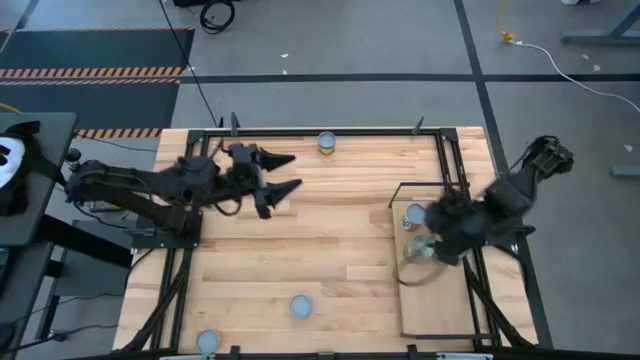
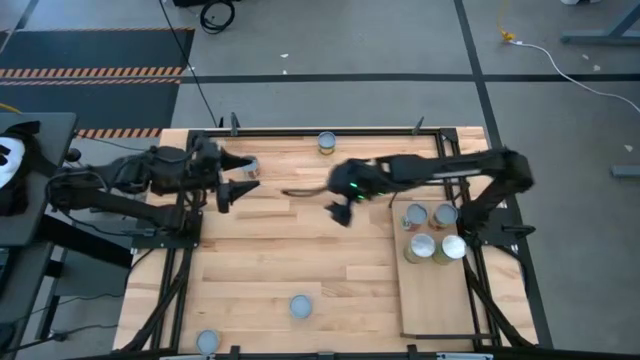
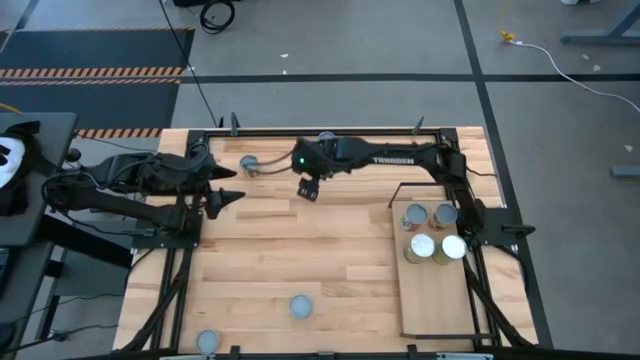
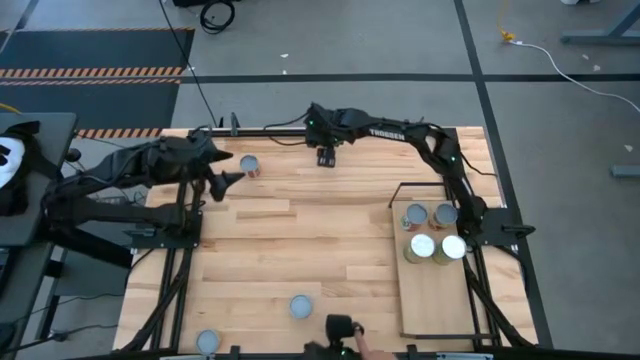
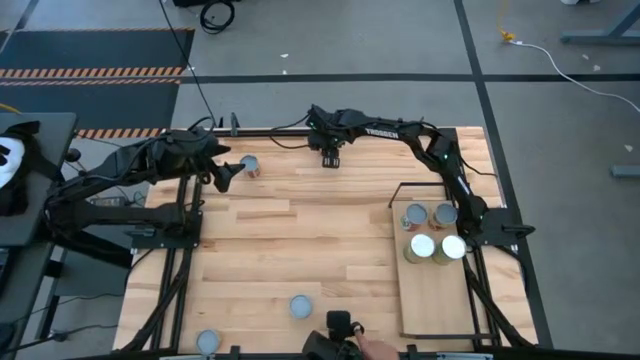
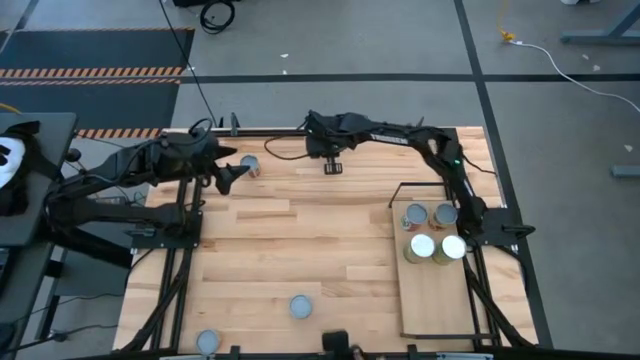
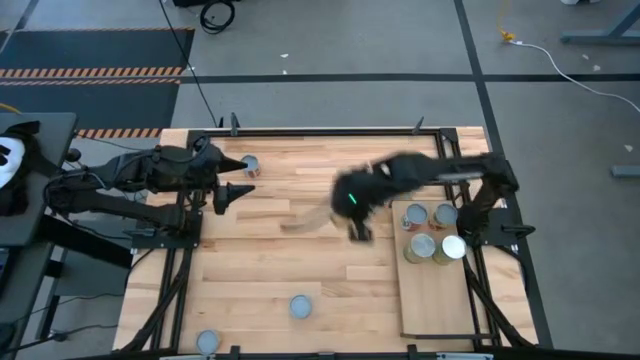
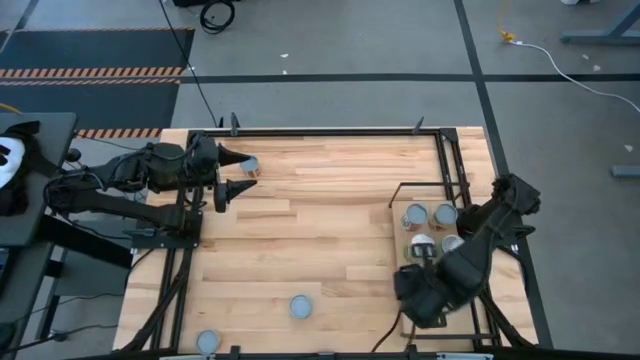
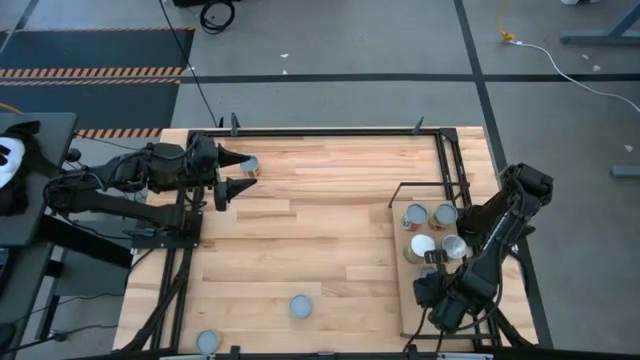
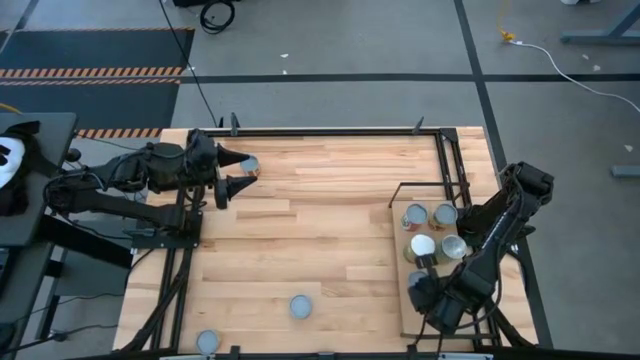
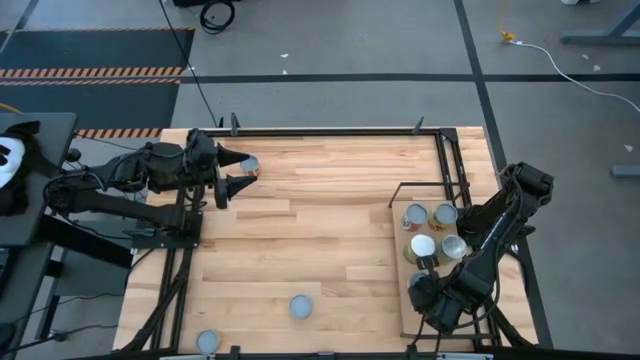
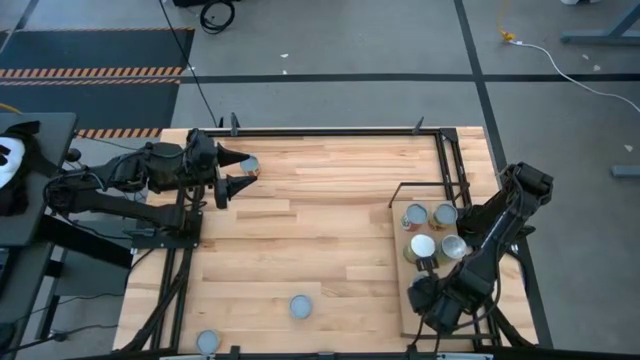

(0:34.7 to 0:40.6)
Task: Pick and place cans onto a shelf
Put the canned peach on the shelf

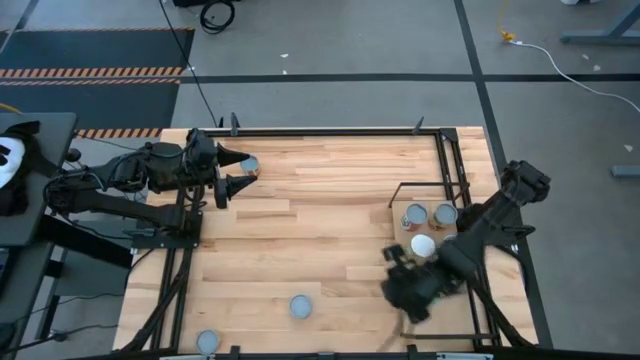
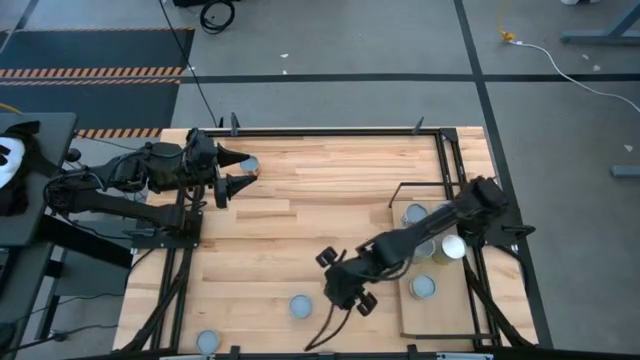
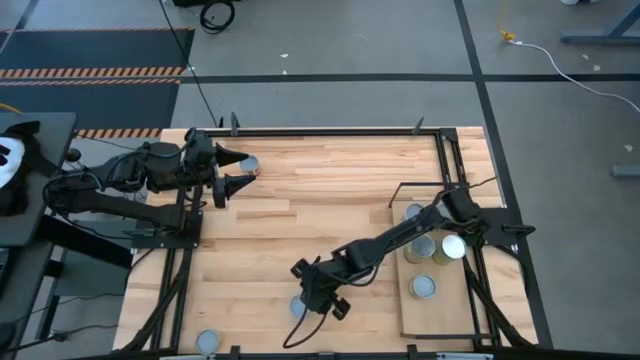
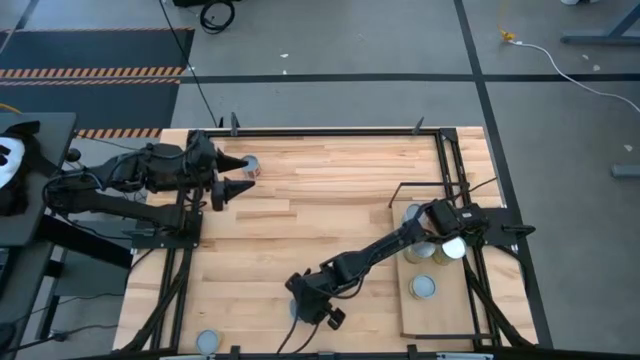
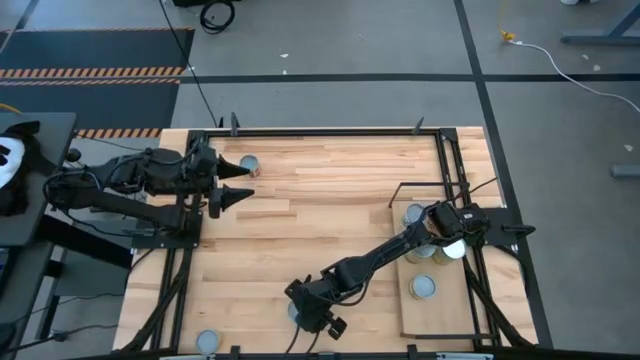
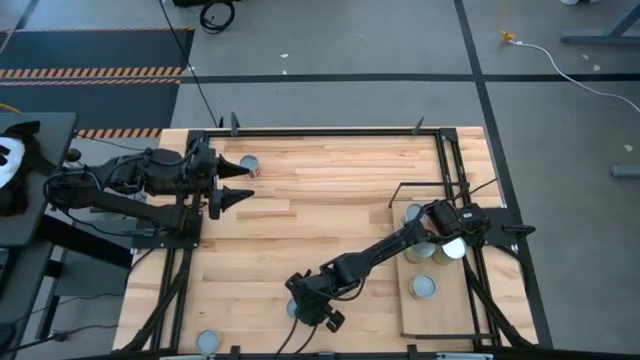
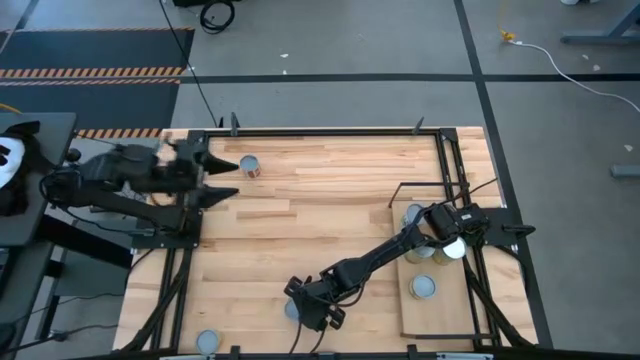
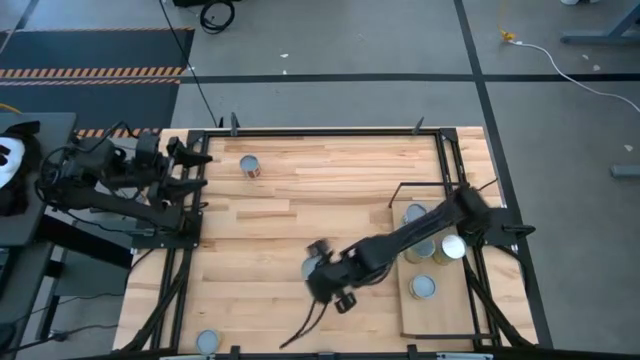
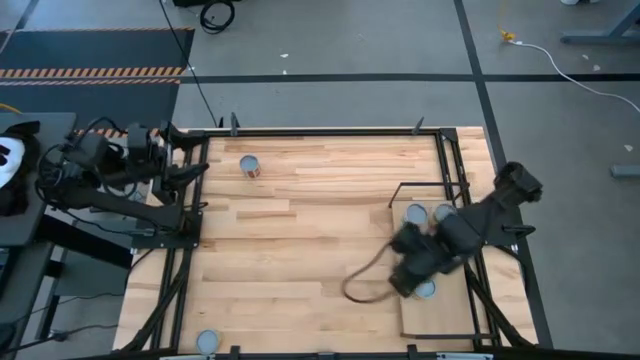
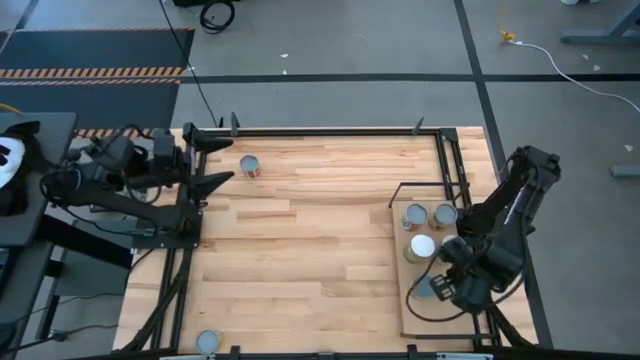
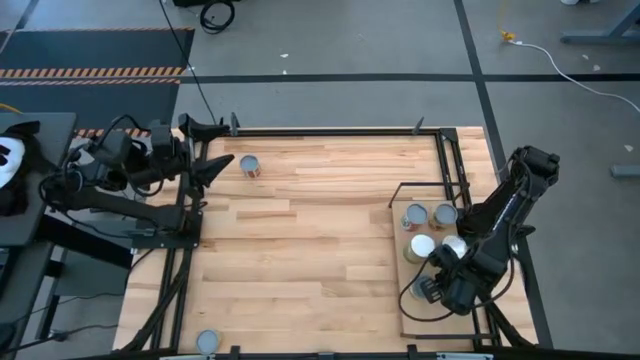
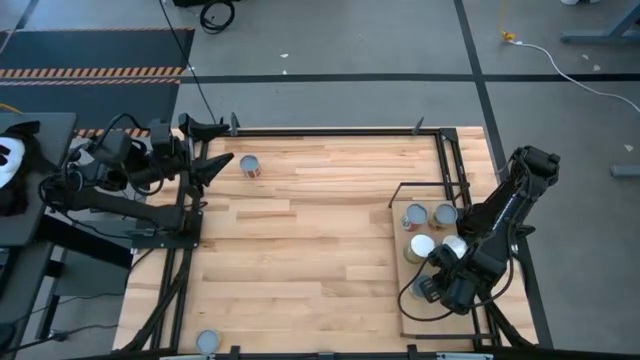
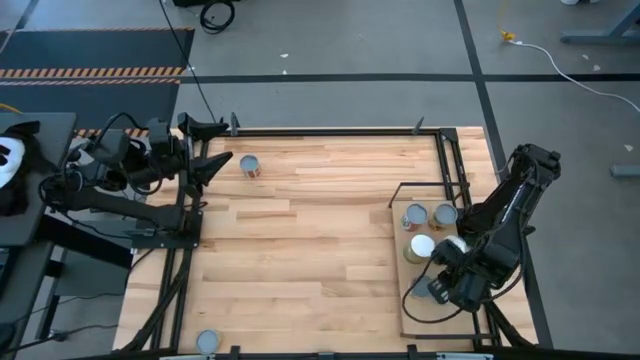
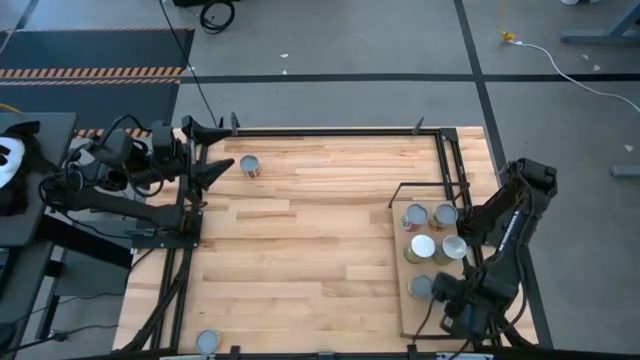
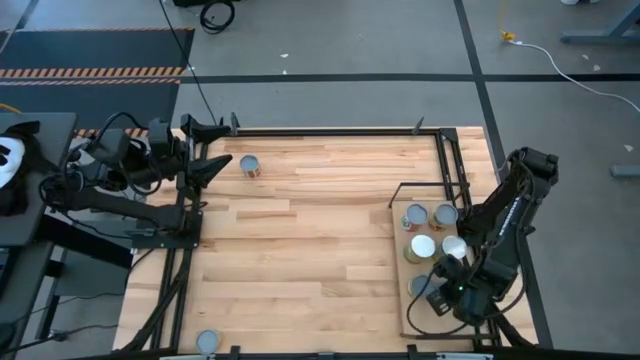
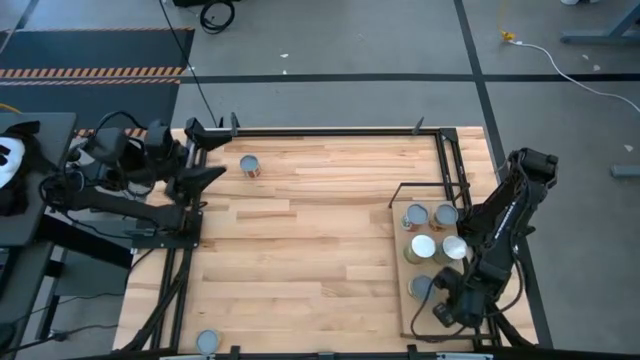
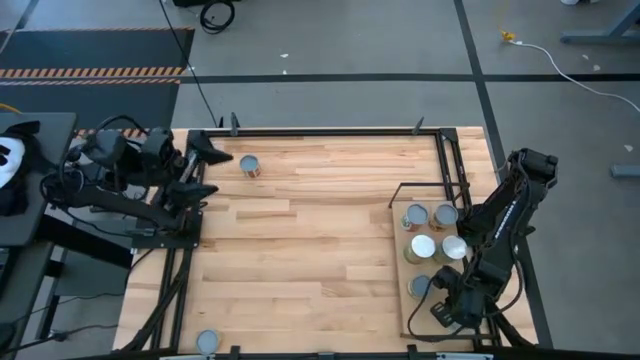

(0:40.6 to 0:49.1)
Put the green tuna can on the shelf

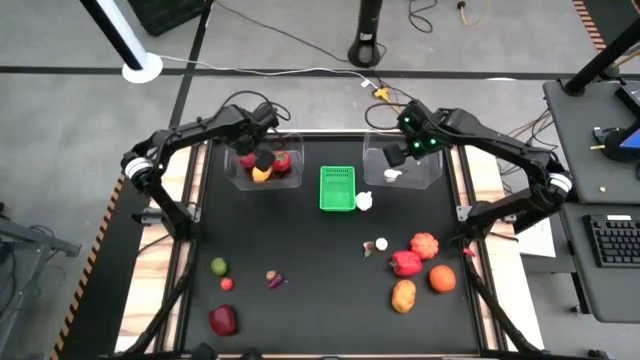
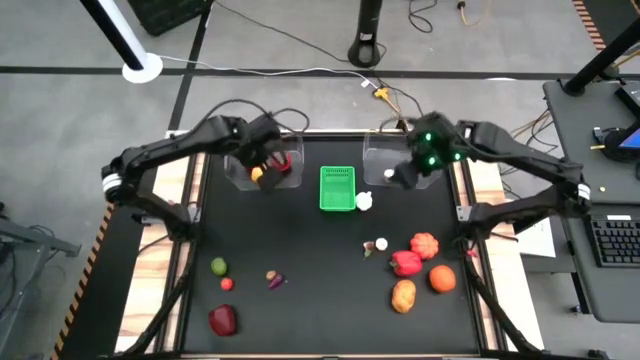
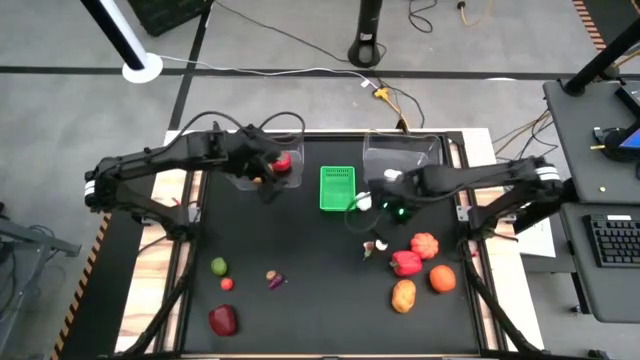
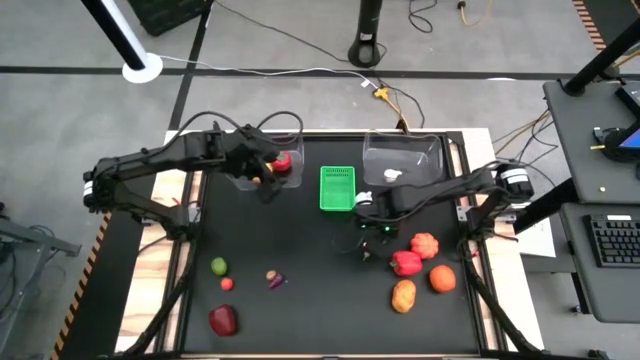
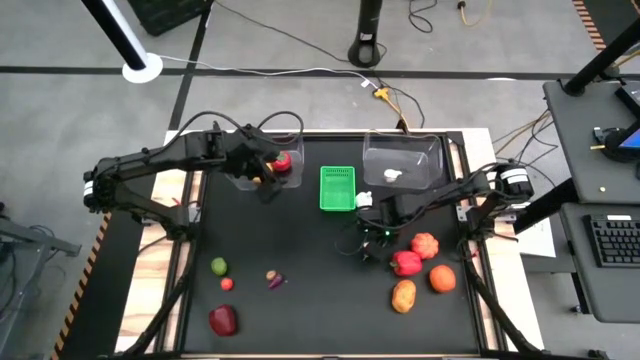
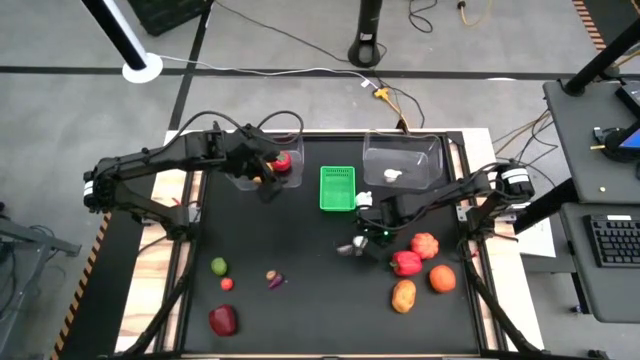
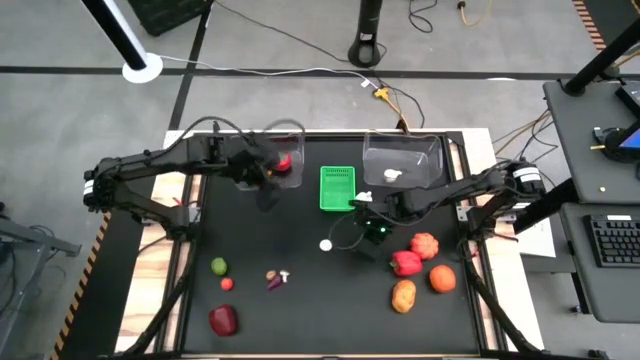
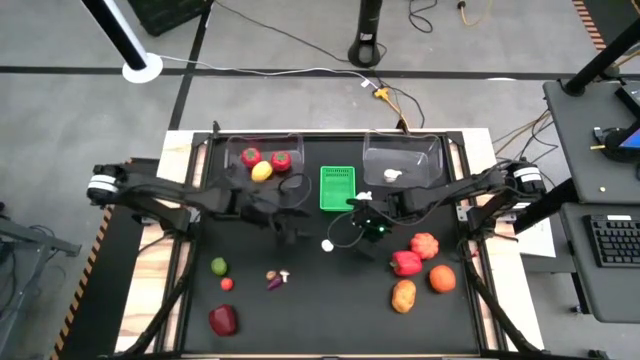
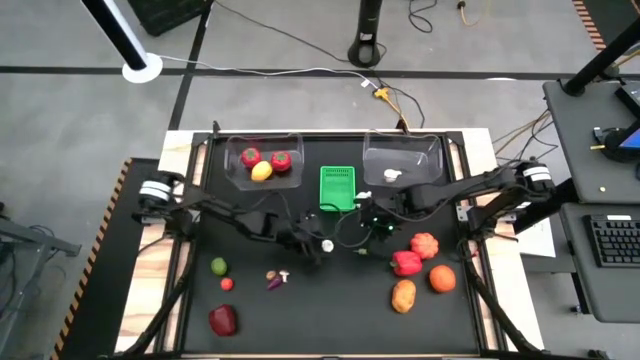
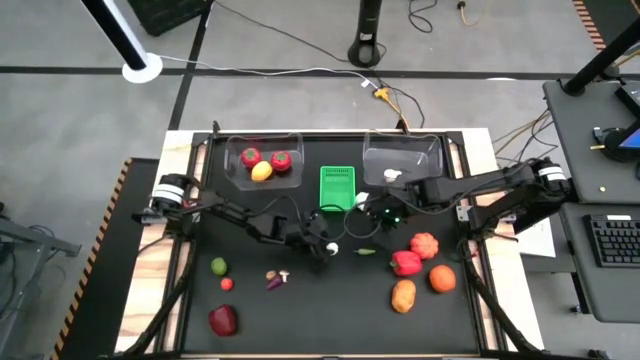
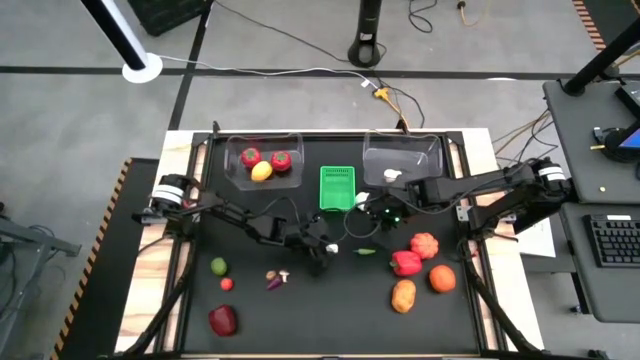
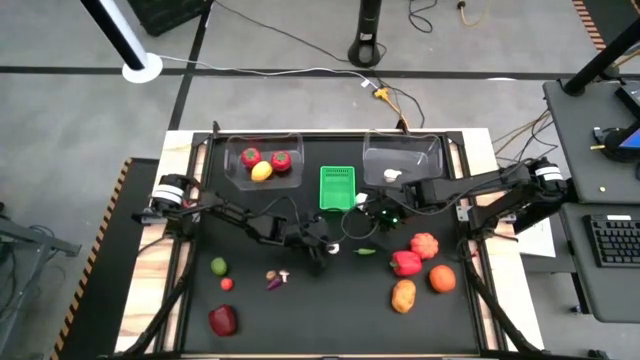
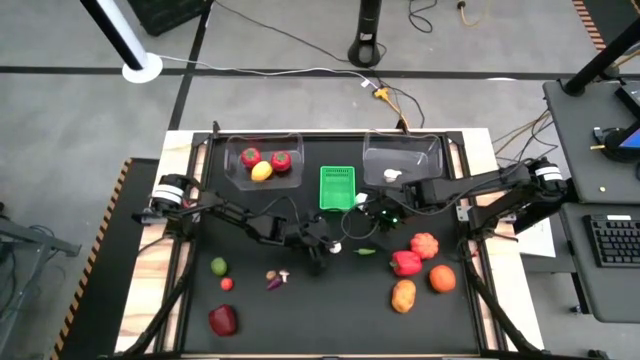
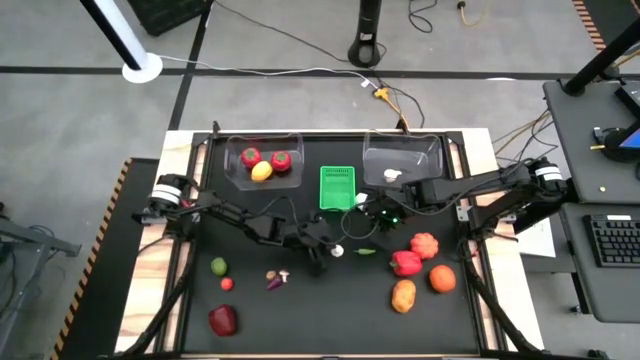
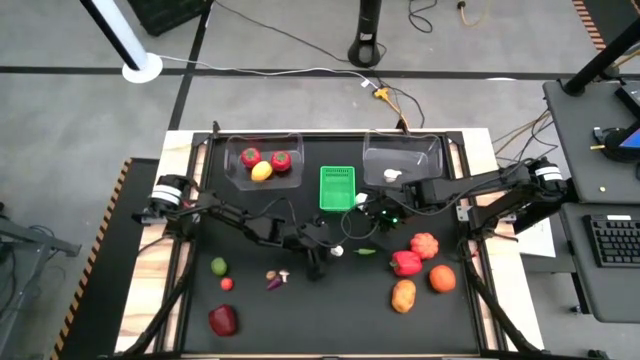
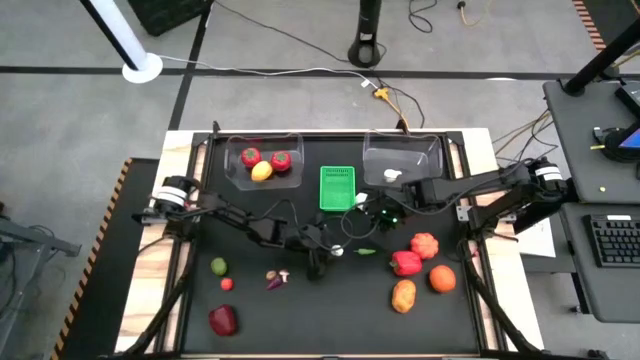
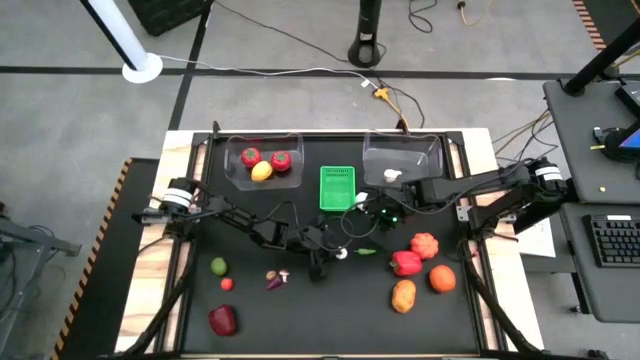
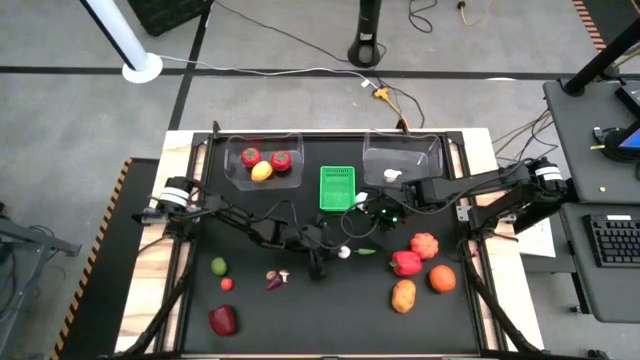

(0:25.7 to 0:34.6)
Task: Sort produce into baskets
Put the bottom garlic into the green basket
